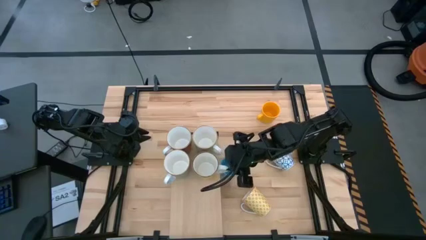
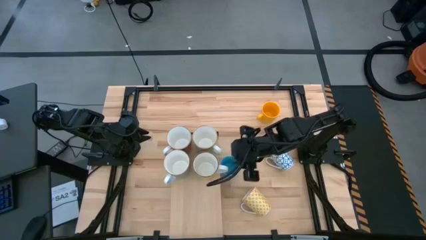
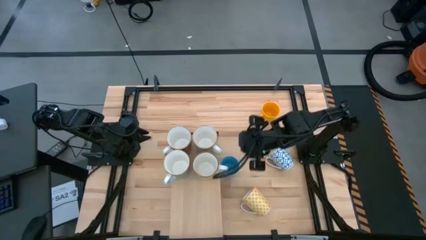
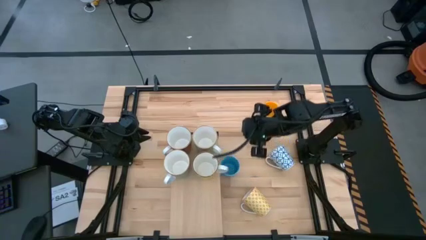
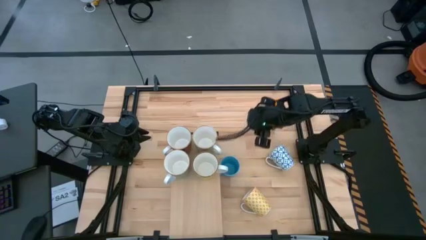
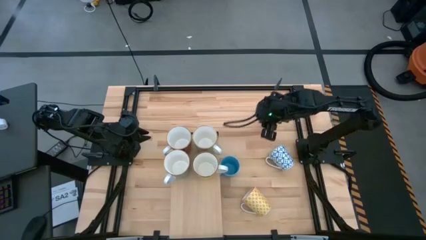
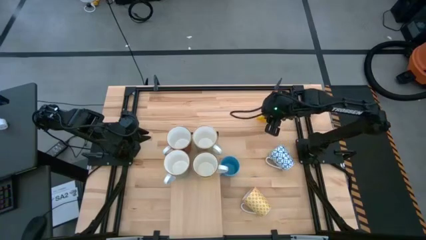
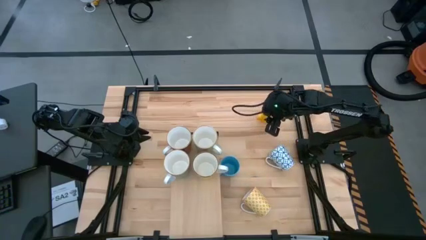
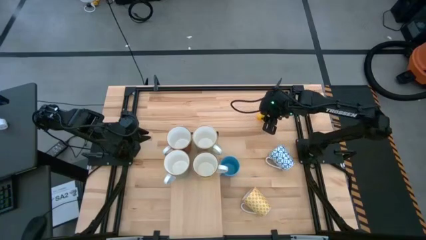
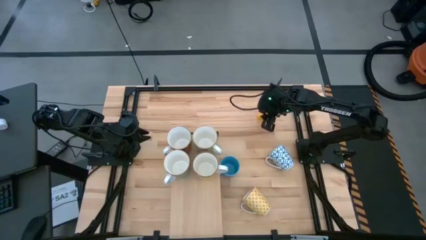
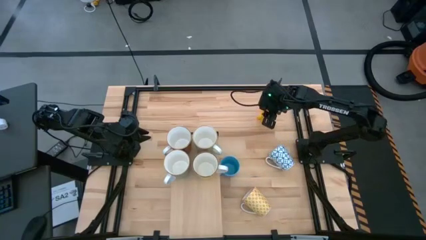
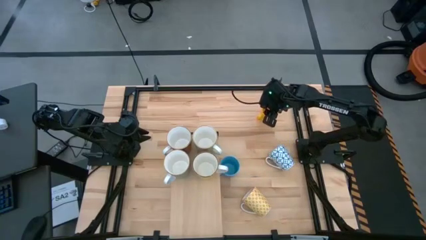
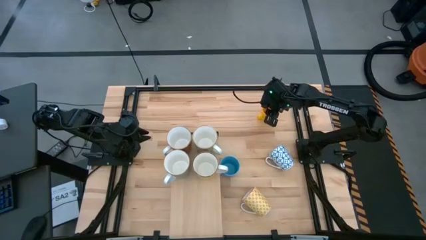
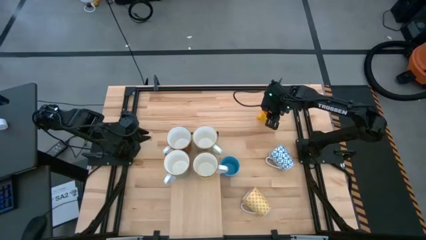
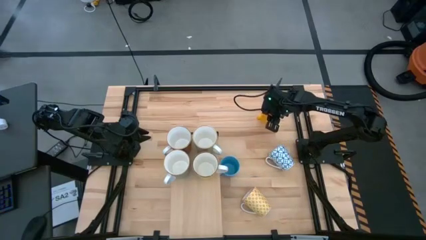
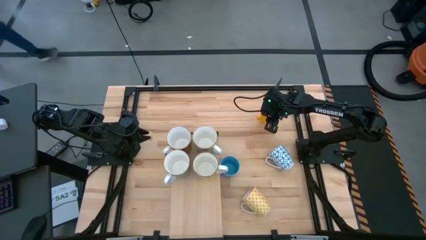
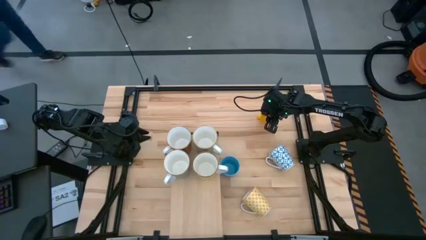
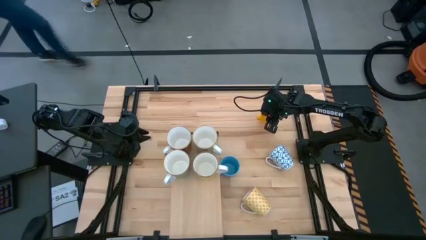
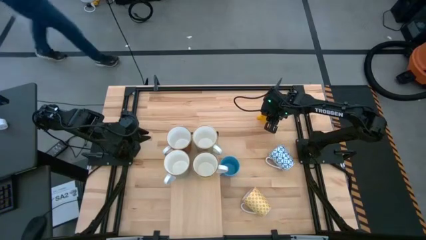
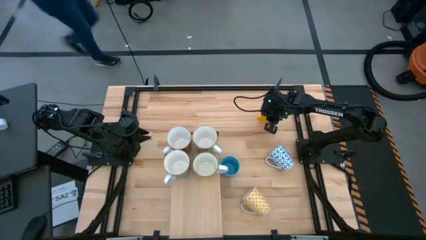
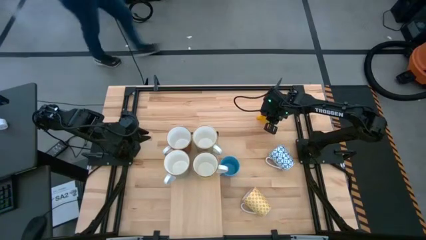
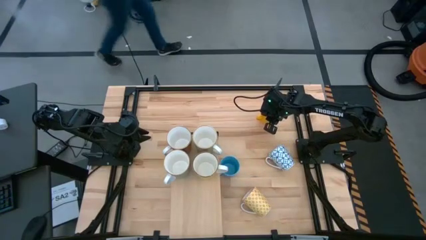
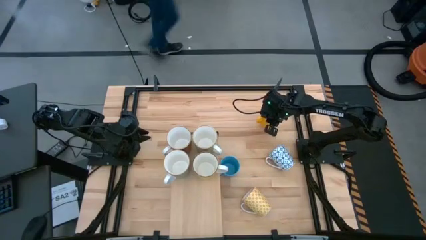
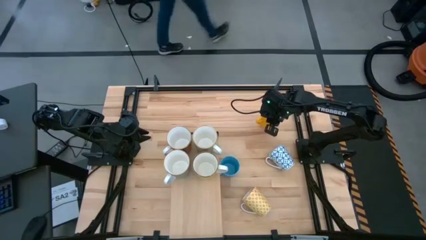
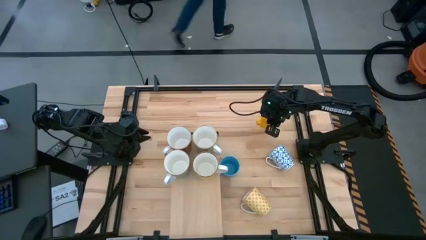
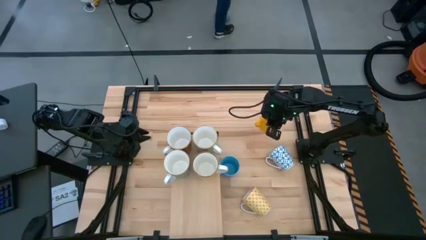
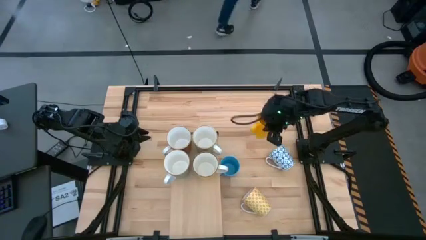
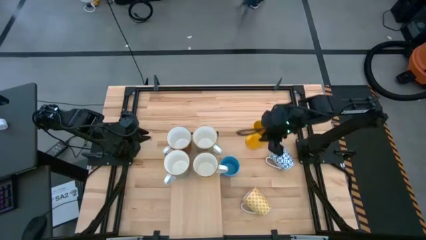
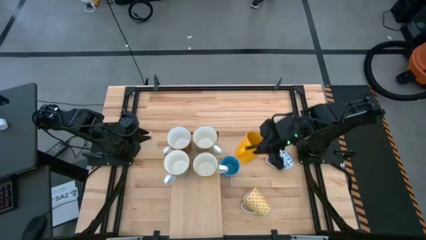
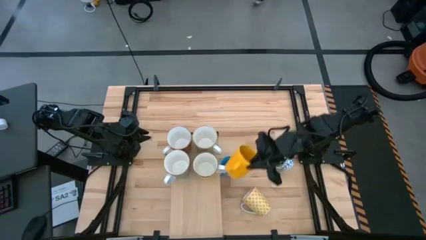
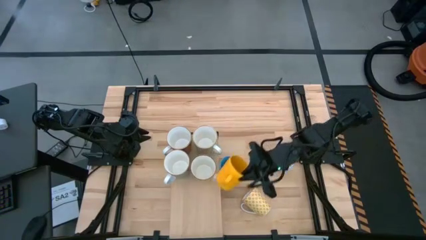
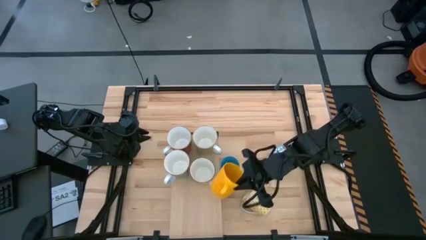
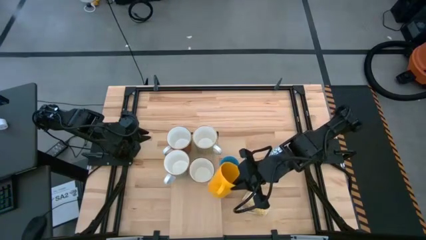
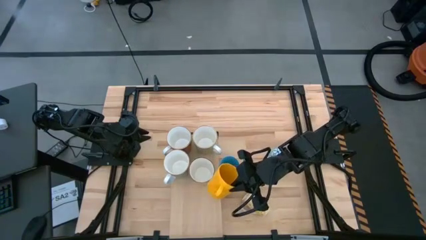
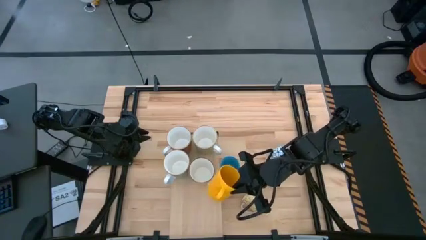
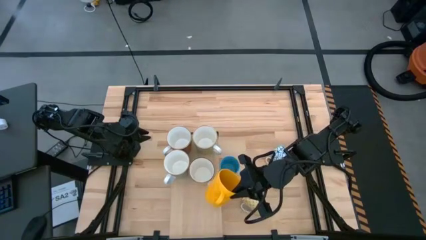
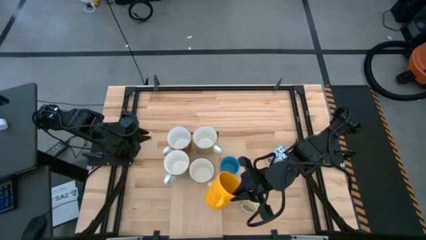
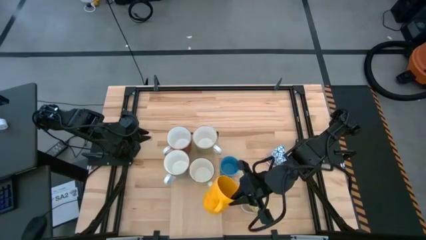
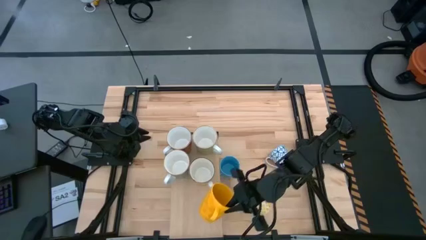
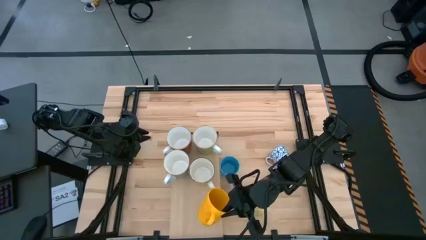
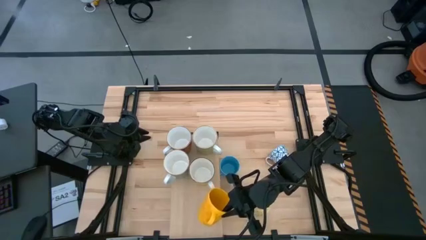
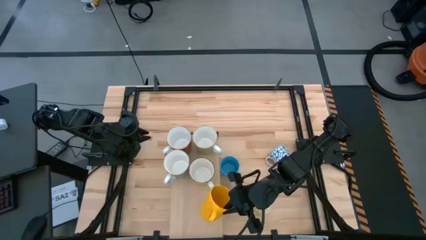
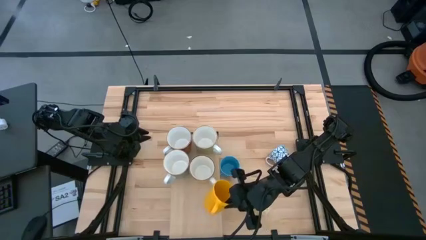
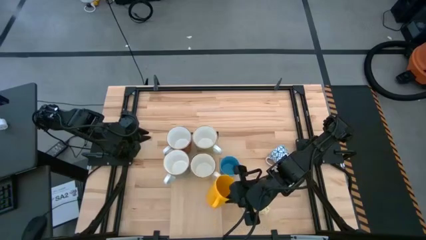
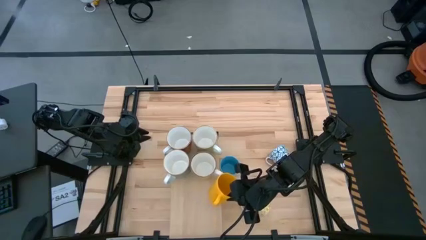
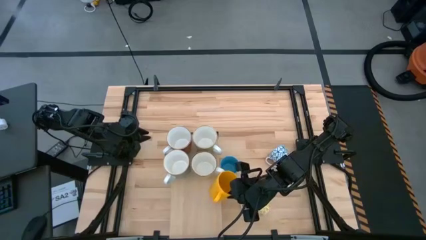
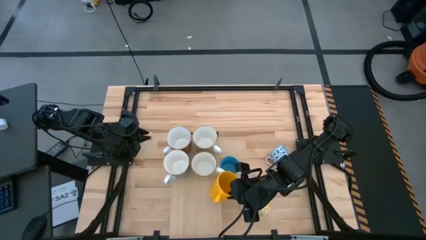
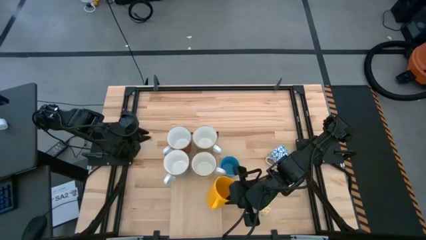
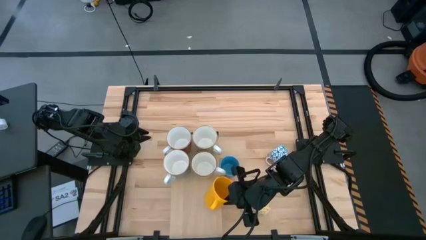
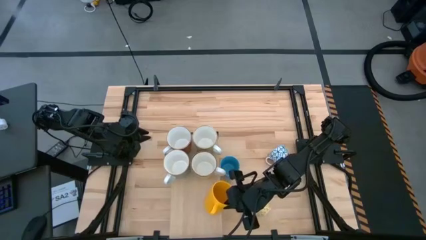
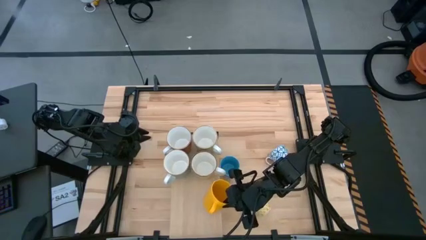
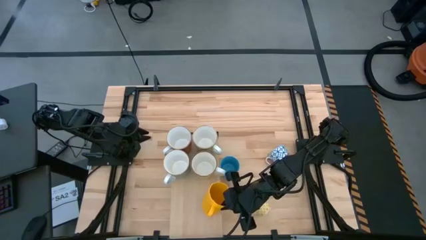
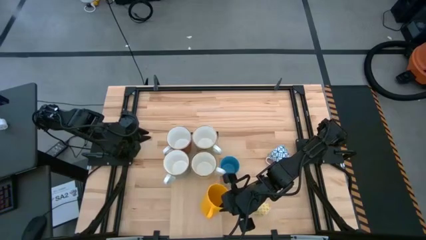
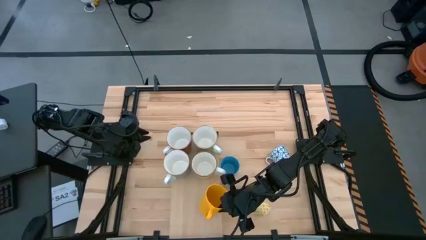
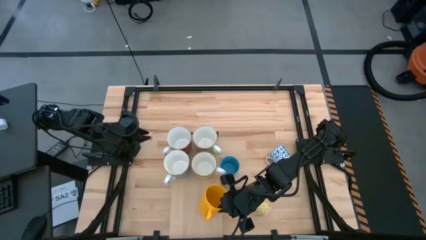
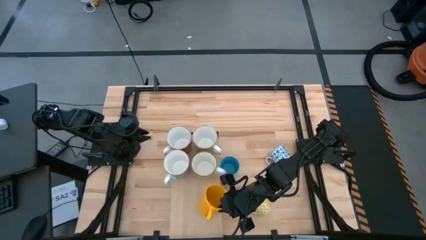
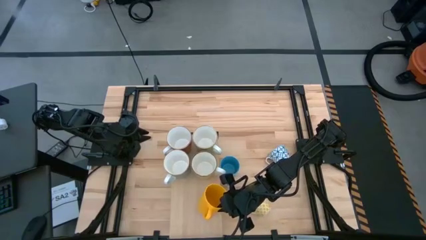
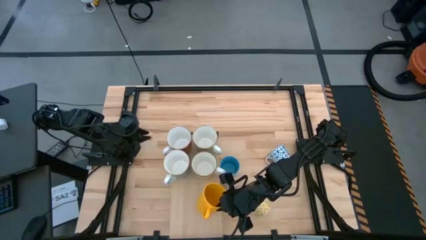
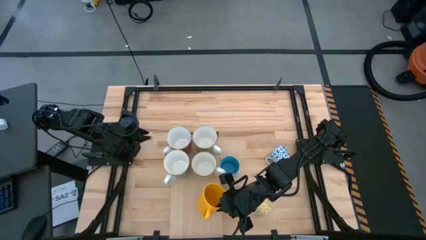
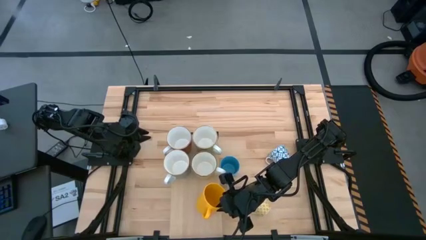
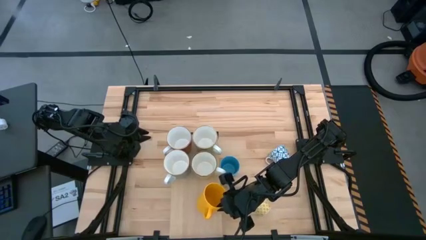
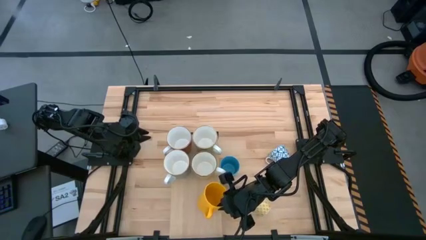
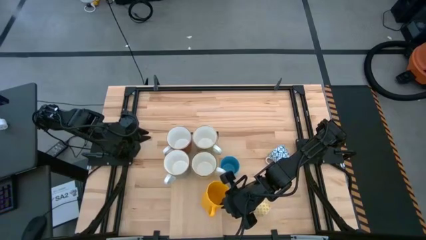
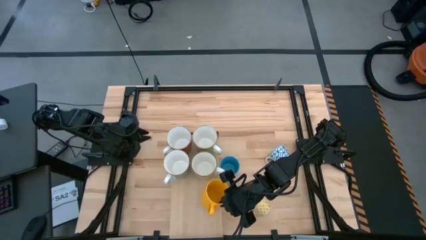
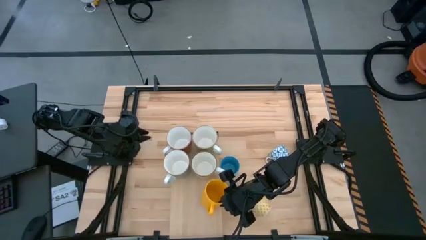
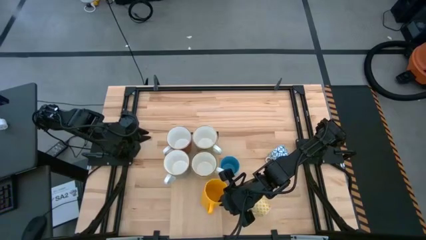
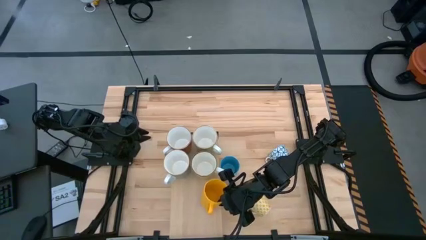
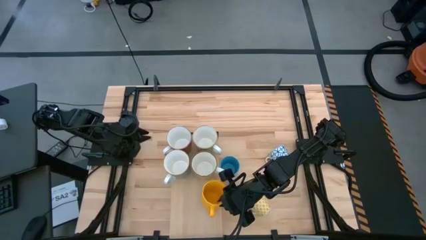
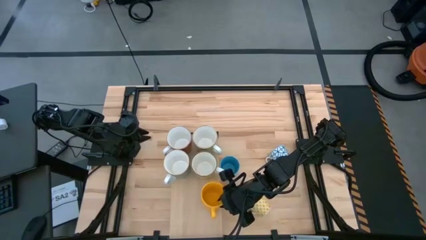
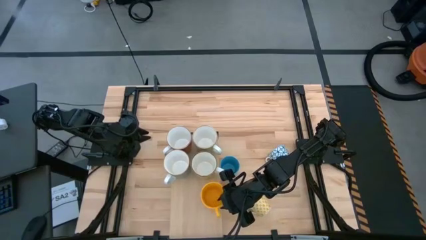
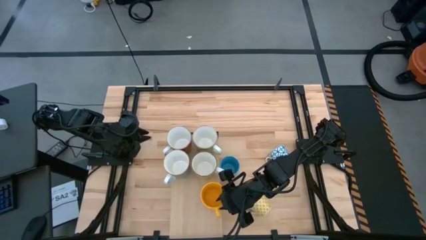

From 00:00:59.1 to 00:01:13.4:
Task: Place coffee mugs
Put the top yellow mug on the shelf aligned with the blue mug

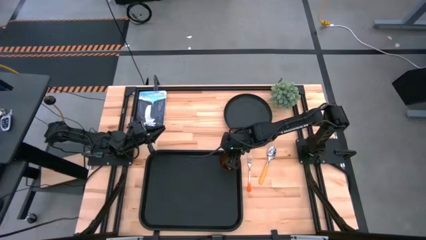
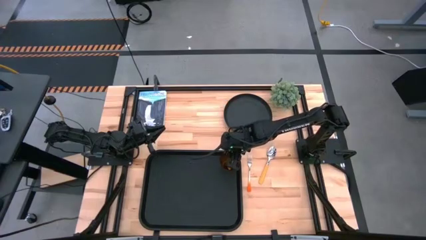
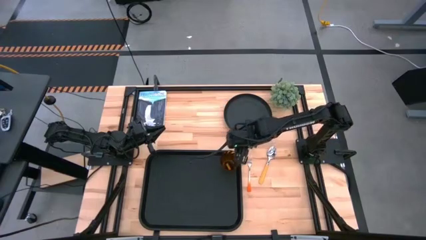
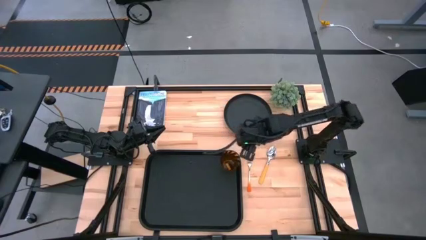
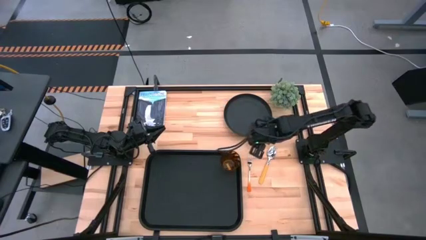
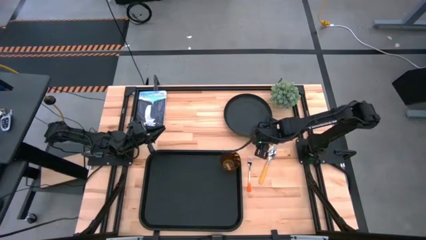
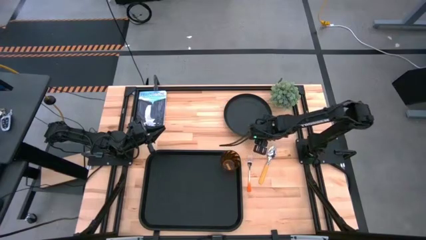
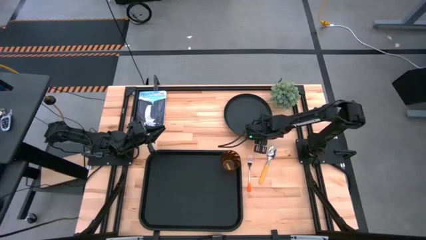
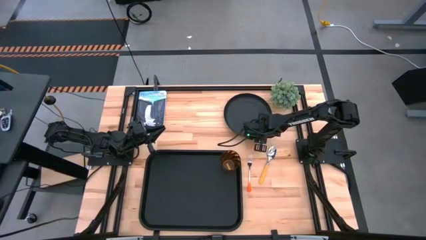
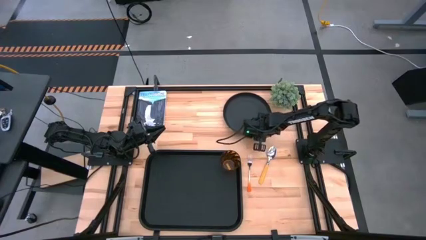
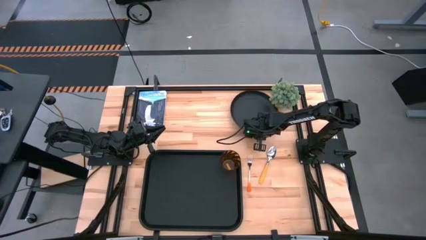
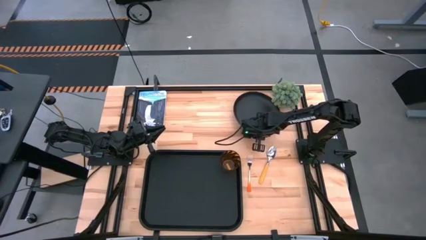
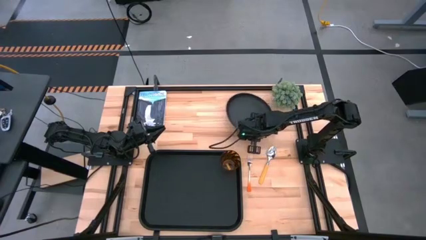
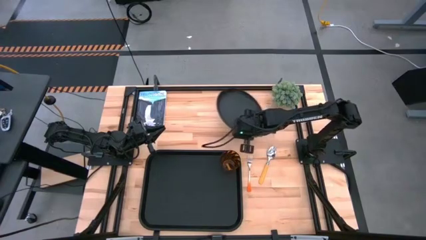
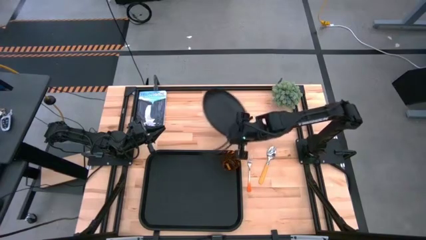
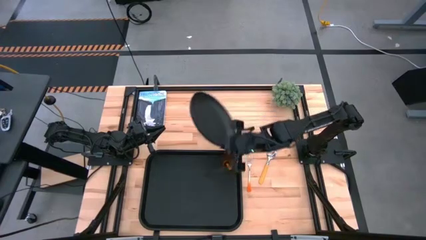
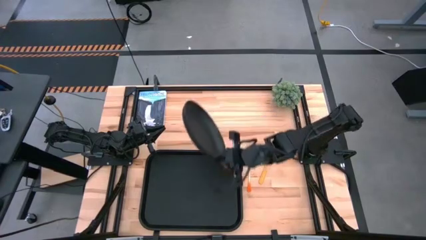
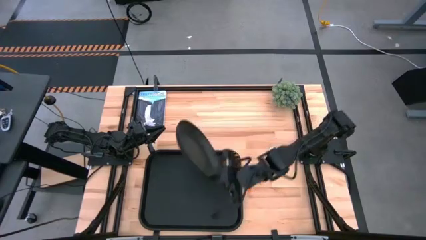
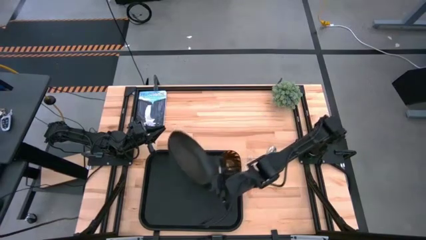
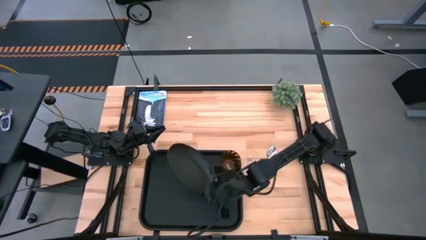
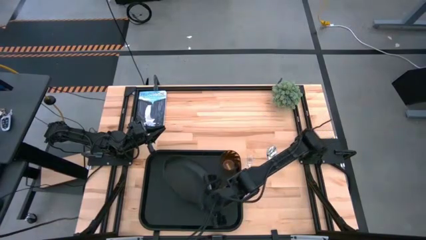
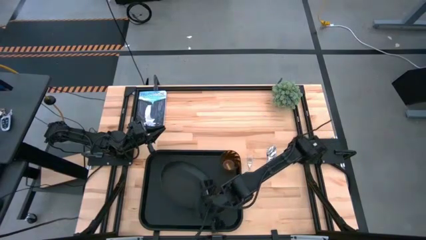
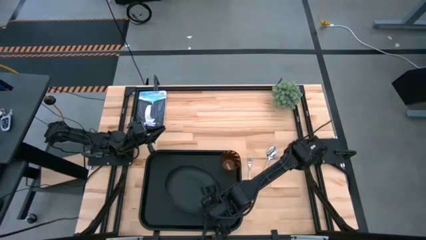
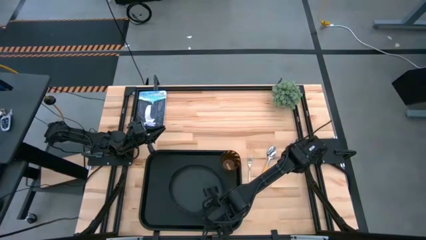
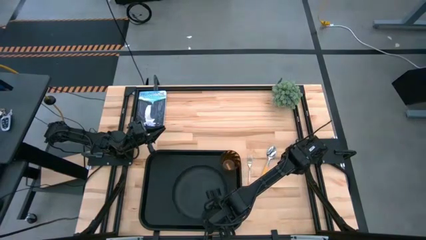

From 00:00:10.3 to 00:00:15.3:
Task: Pick and place plate/cup/fork/spoon on tray
Put the black plate on the bottom left of the black serving tray
